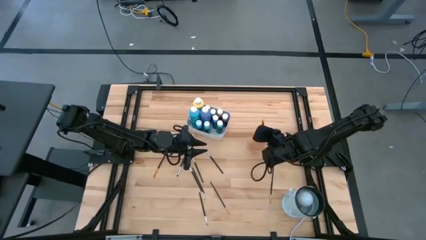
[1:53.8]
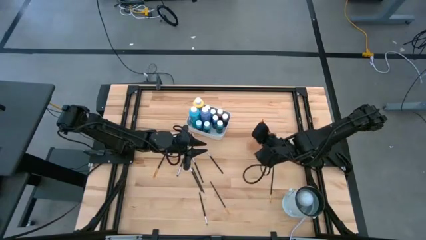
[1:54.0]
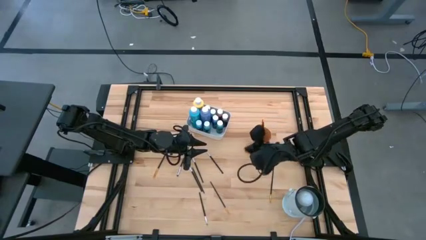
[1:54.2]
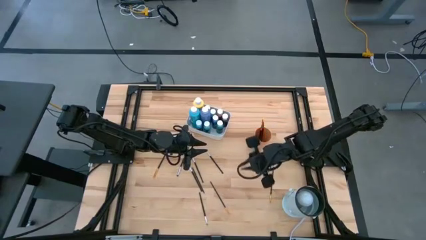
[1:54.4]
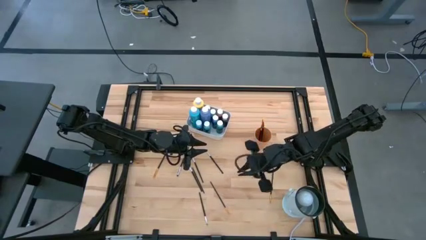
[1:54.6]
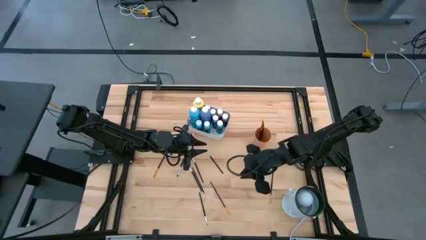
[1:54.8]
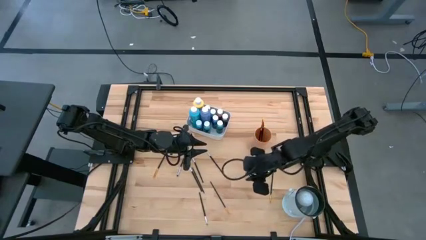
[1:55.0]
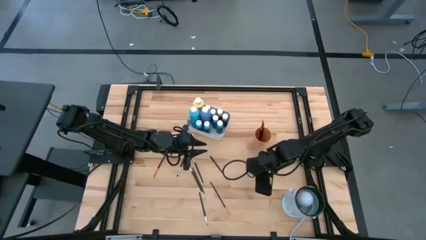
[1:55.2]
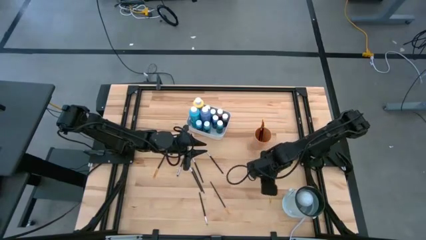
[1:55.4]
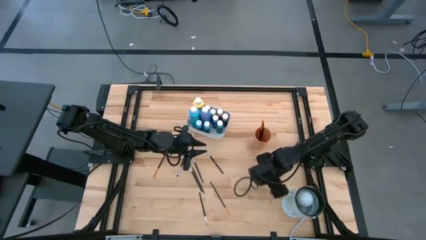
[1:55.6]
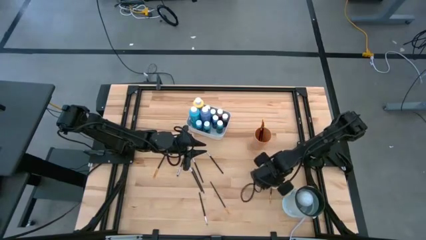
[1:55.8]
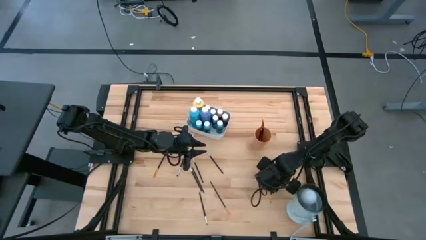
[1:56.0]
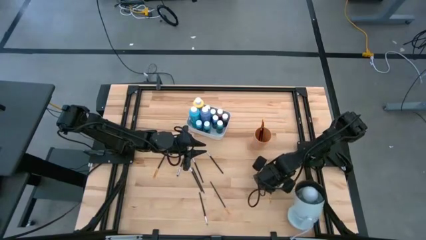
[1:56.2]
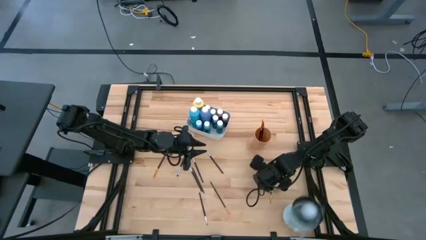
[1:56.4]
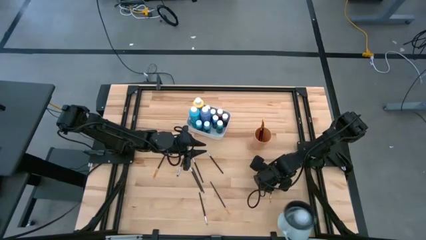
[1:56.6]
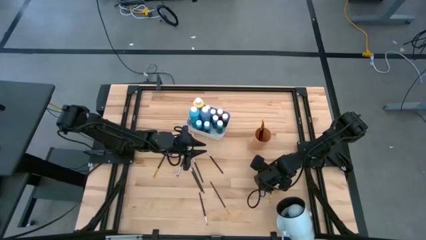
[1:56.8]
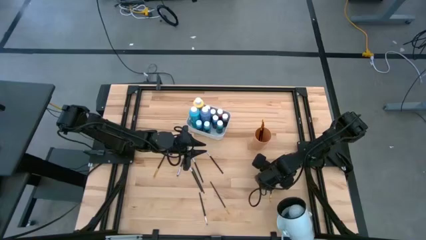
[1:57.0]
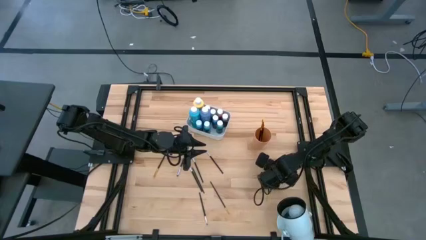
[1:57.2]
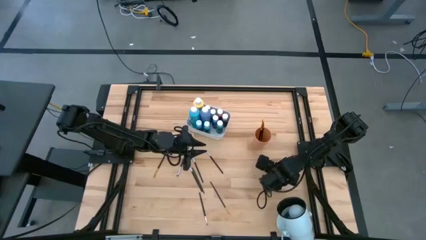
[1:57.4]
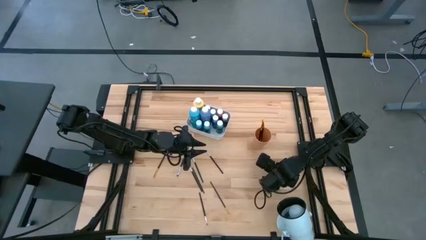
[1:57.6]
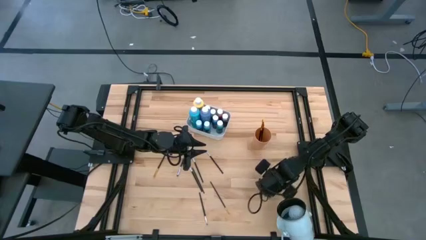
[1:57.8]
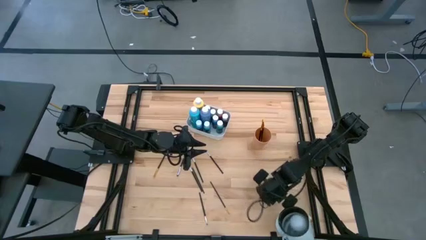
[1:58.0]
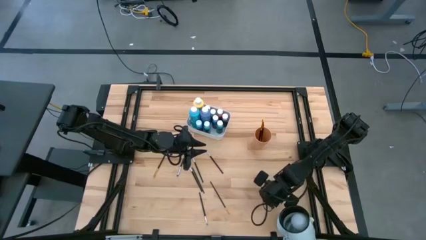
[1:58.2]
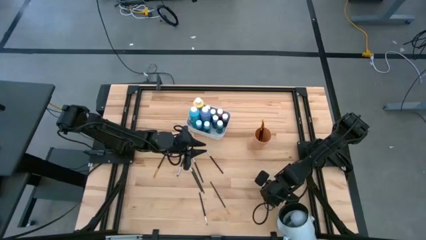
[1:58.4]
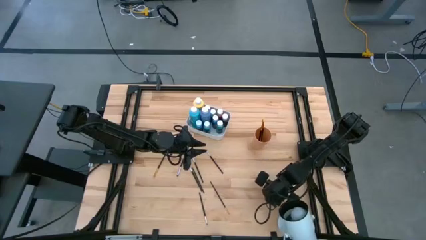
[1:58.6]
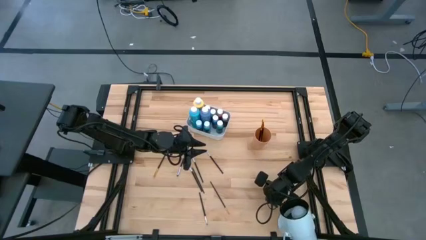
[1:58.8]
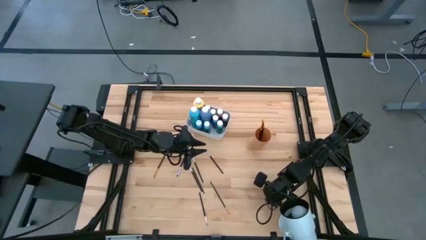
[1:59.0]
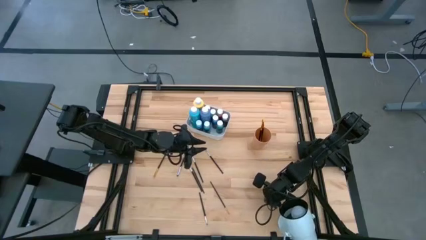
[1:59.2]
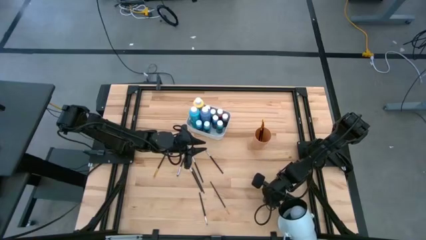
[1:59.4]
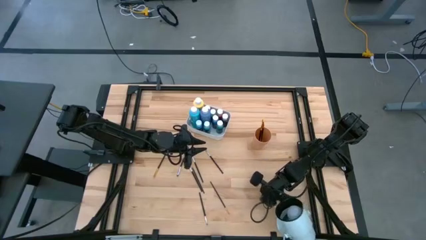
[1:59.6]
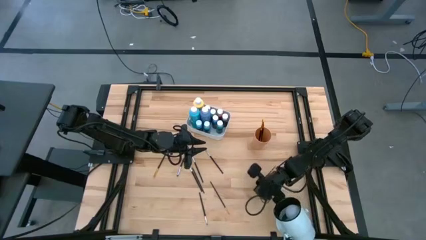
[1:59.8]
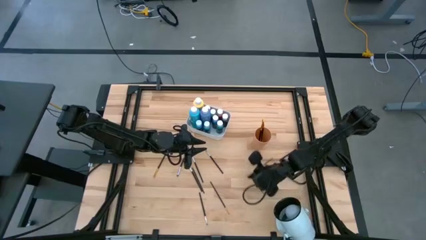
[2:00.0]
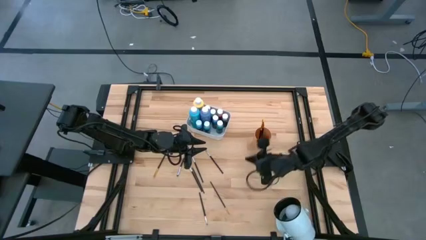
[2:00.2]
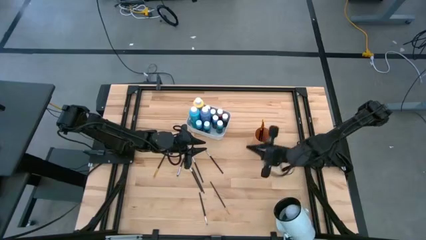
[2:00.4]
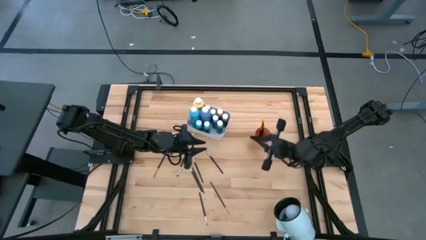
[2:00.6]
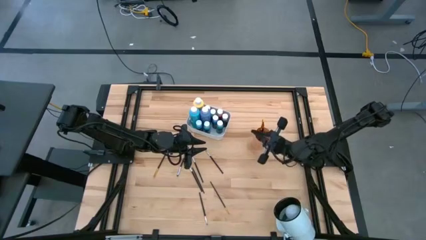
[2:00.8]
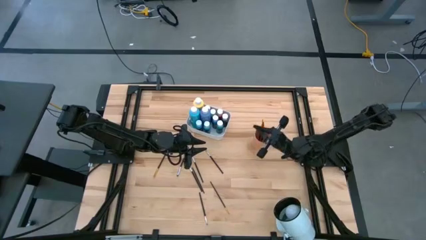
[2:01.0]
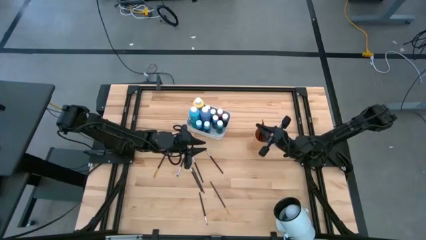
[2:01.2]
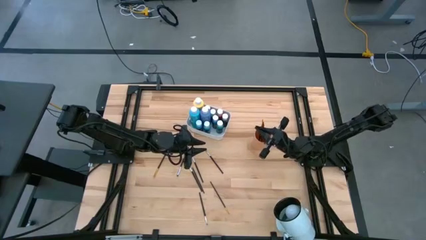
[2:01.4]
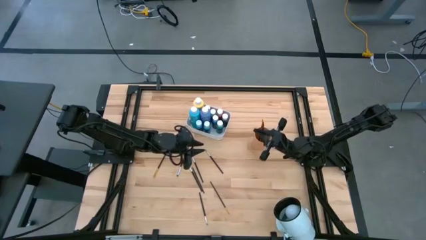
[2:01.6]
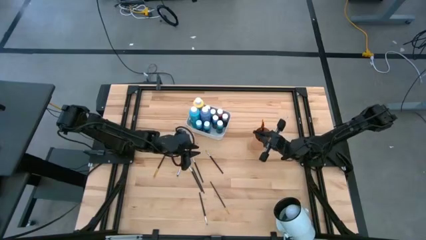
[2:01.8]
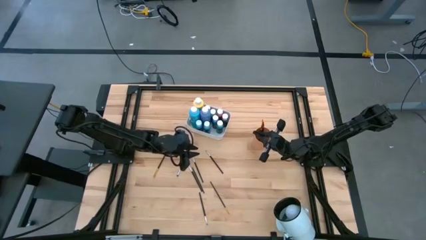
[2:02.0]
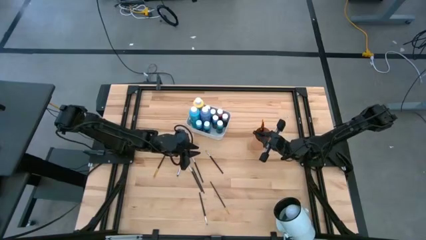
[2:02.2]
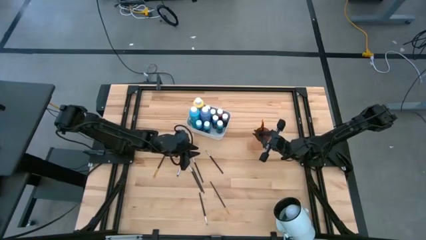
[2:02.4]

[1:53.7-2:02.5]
Task: Pick & Place Paint Supplies
Put the gold paintbrush into the cup

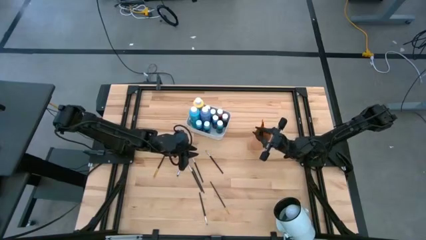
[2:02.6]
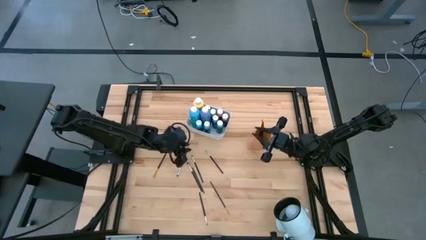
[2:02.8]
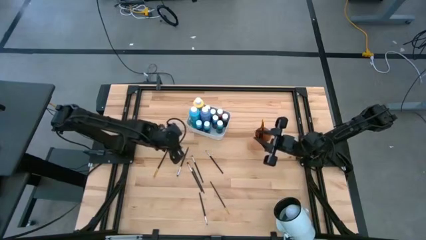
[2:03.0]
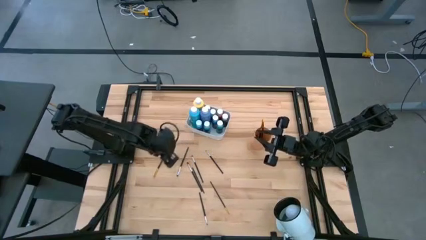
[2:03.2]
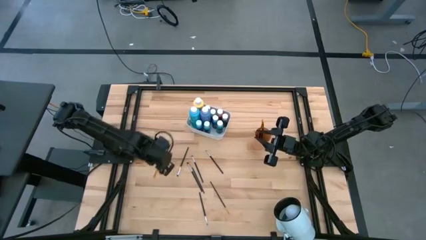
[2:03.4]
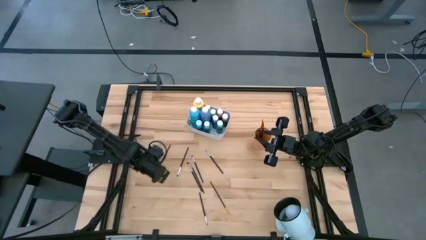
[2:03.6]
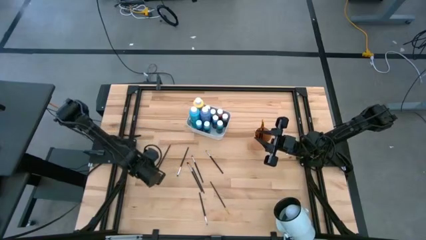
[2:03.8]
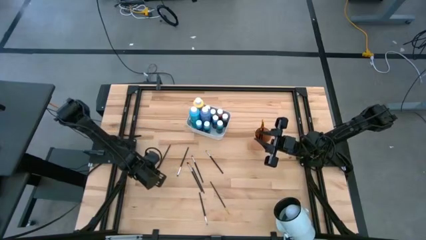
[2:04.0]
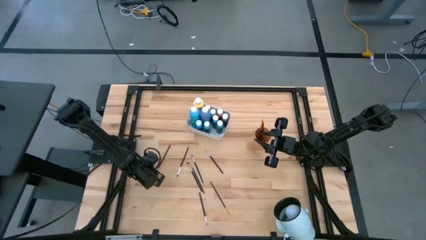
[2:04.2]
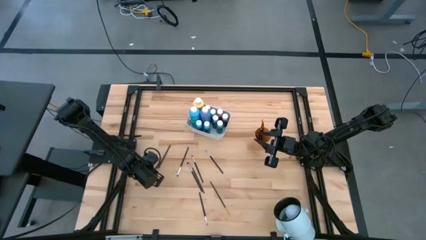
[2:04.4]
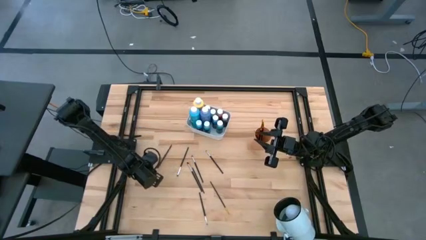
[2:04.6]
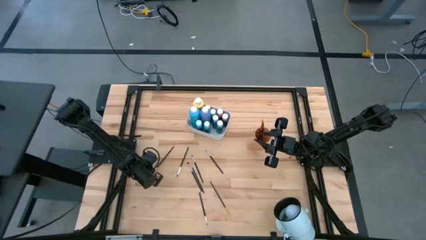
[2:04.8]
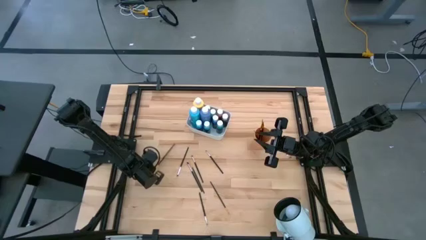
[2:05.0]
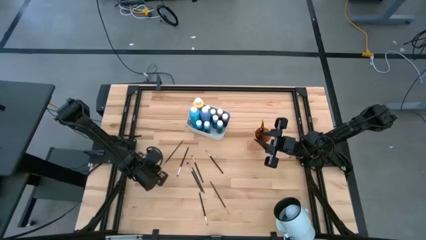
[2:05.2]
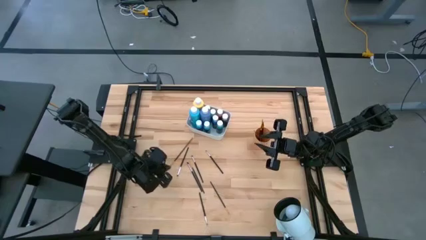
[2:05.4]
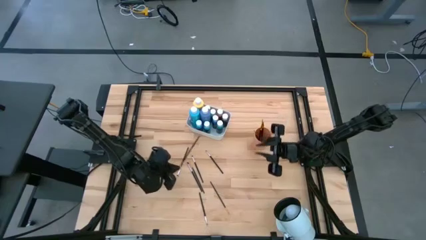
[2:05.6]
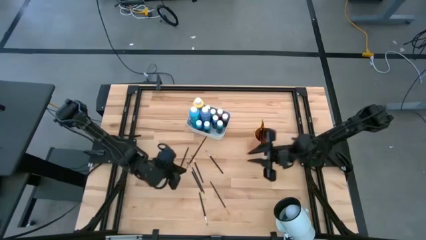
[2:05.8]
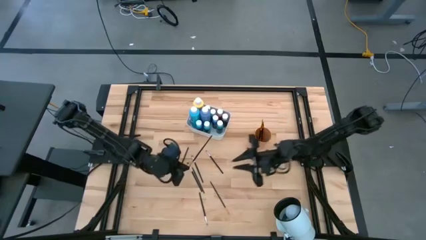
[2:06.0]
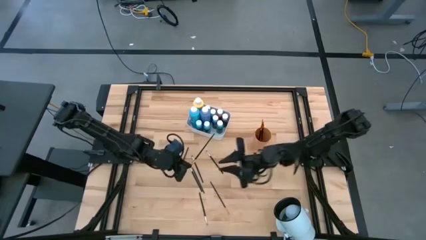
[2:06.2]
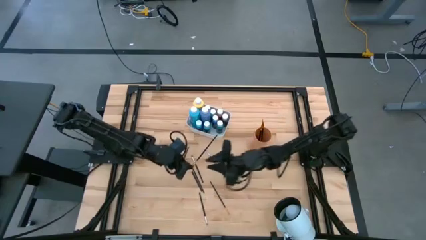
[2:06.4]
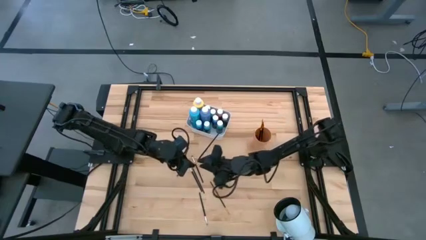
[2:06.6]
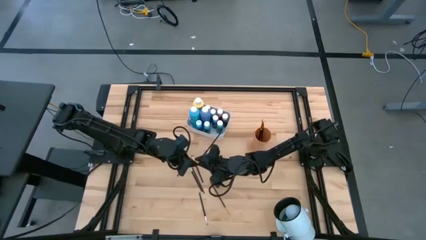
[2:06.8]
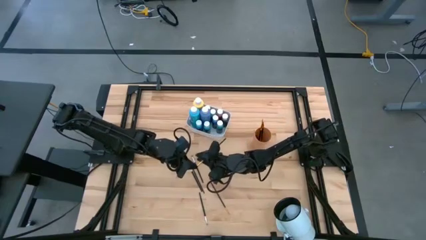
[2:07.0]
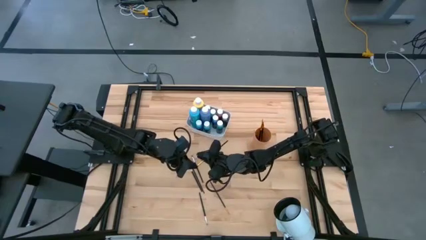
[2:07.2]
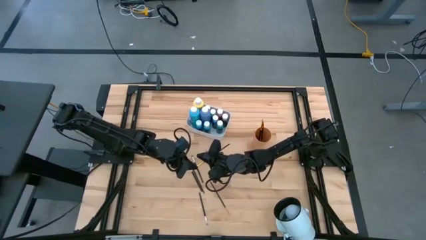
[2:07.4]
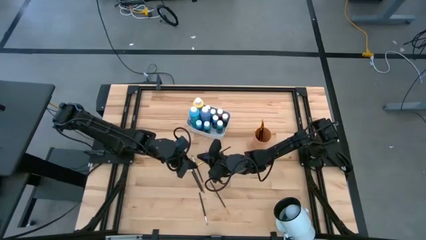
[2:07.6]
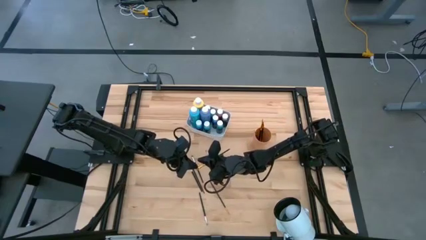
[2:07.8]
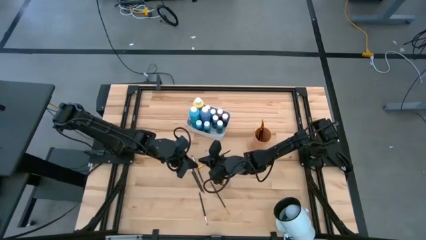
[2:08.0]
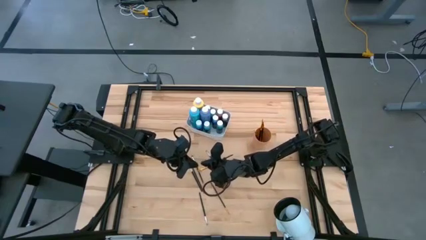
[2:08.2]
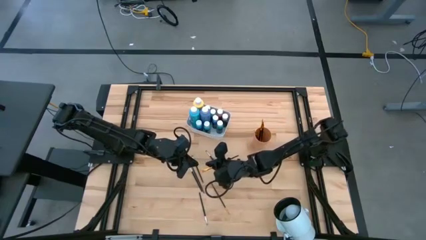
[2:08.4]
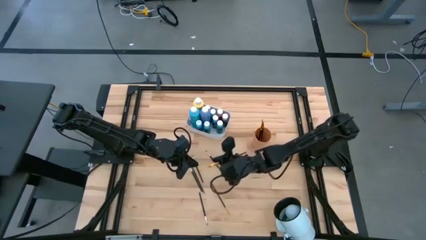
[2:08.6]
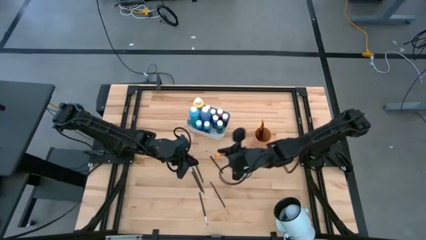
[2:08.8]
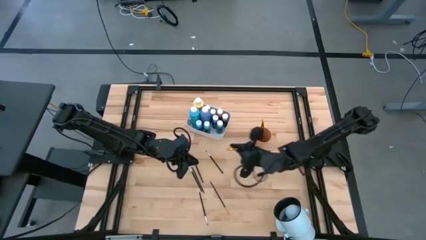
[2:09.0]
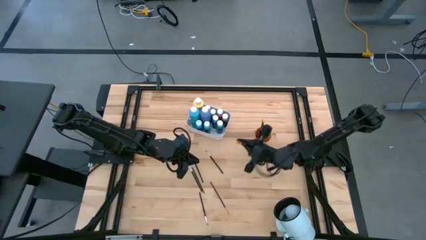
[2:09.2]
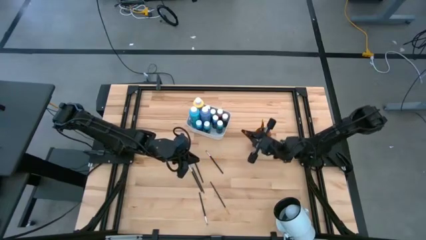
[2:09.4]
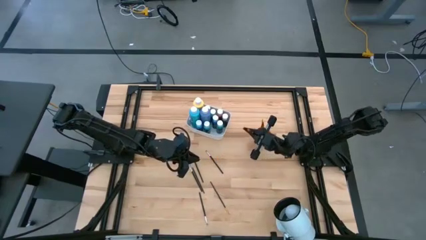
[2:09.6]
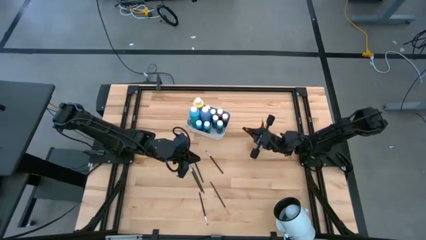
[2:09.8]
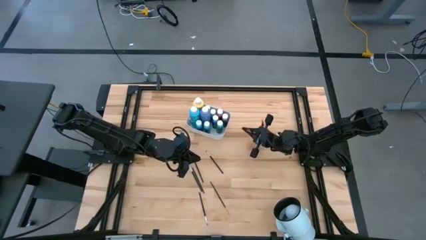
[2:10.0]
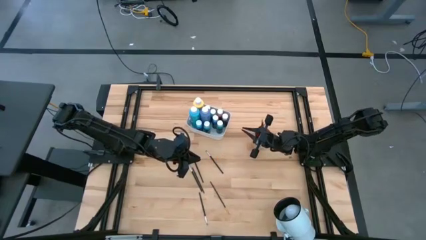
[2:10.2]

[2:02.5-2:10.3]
Put the gold paintbrush into the cup
